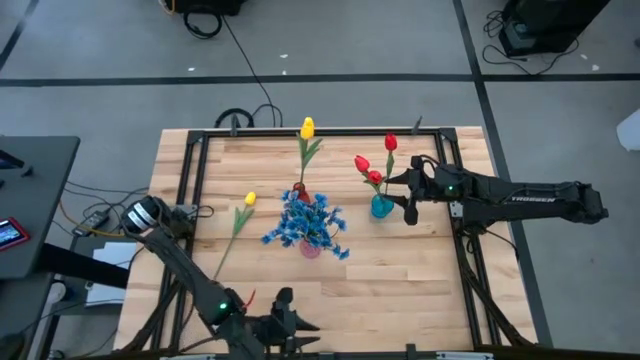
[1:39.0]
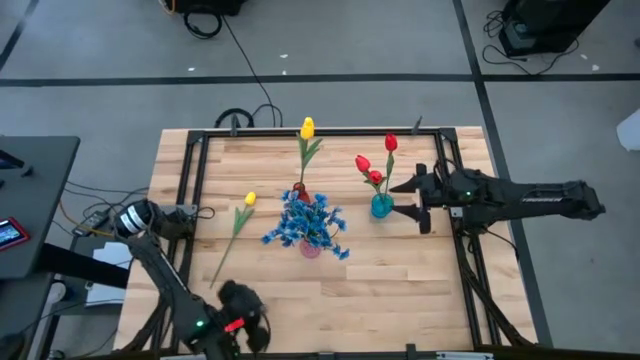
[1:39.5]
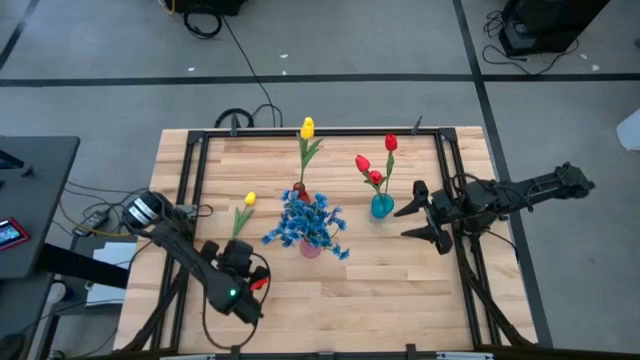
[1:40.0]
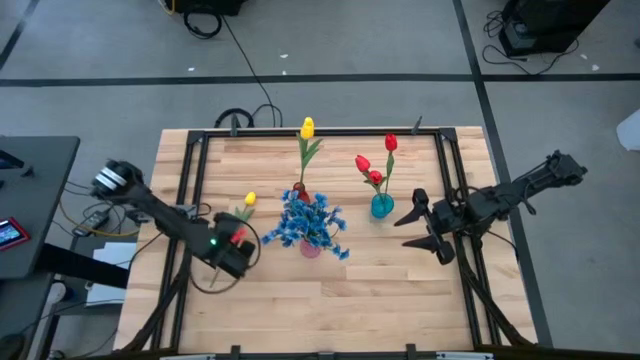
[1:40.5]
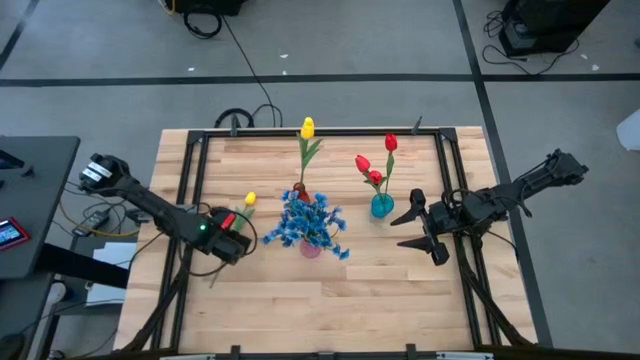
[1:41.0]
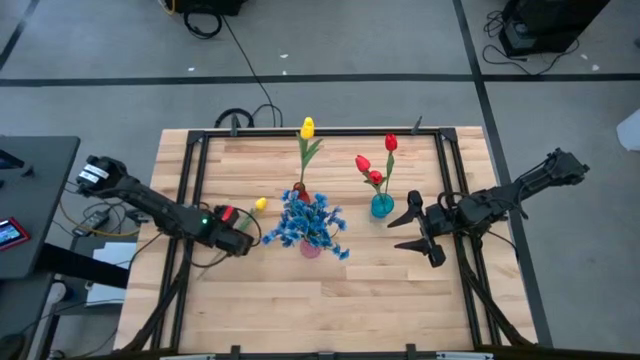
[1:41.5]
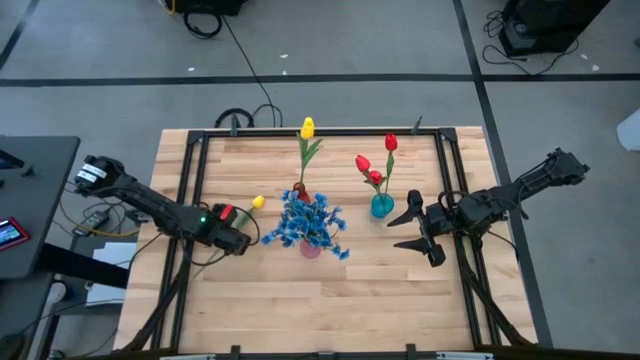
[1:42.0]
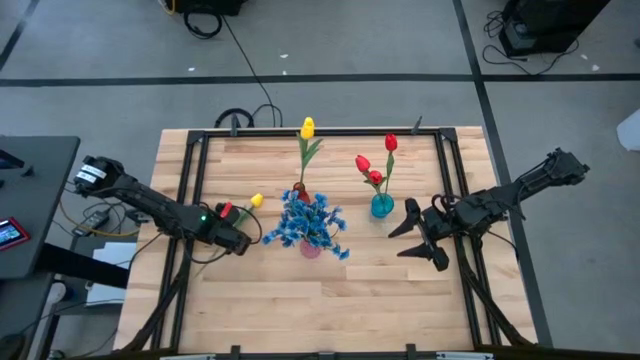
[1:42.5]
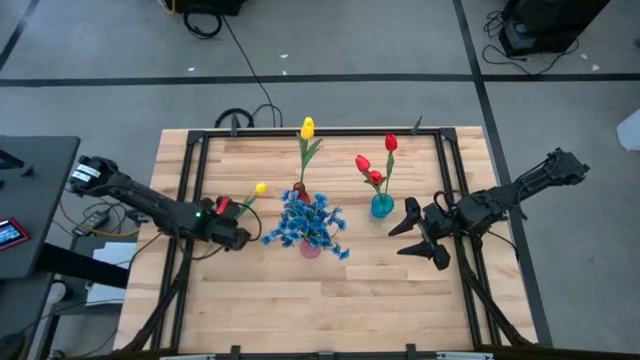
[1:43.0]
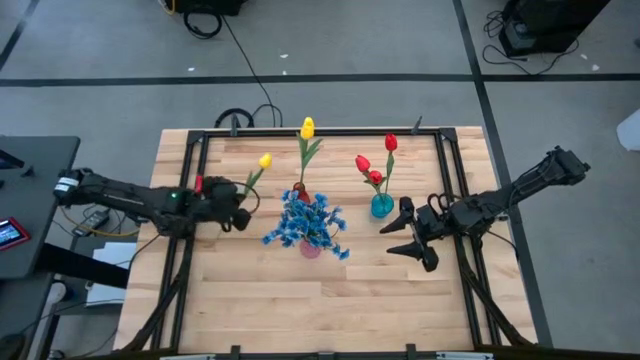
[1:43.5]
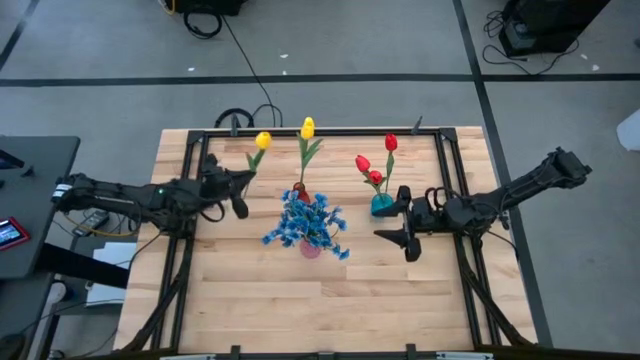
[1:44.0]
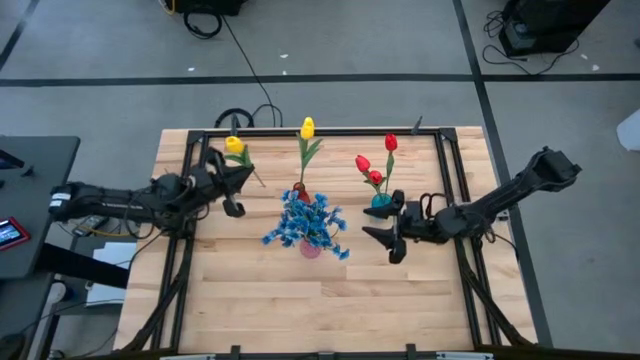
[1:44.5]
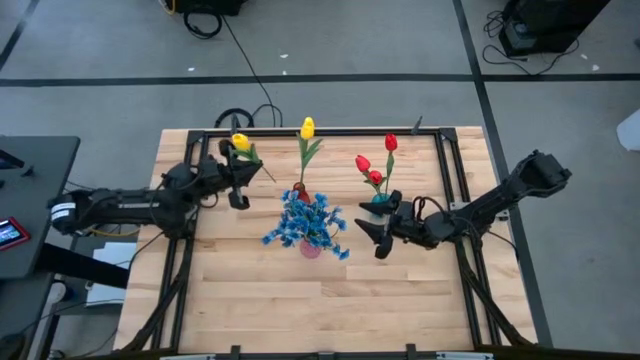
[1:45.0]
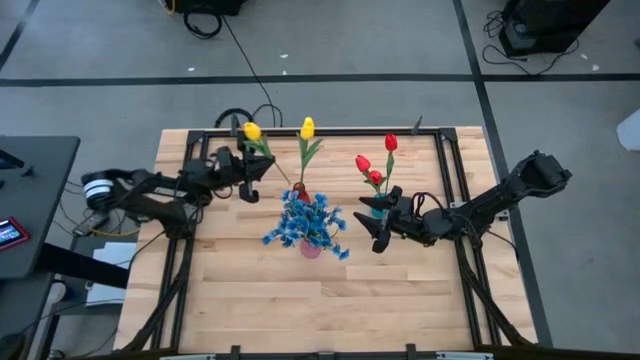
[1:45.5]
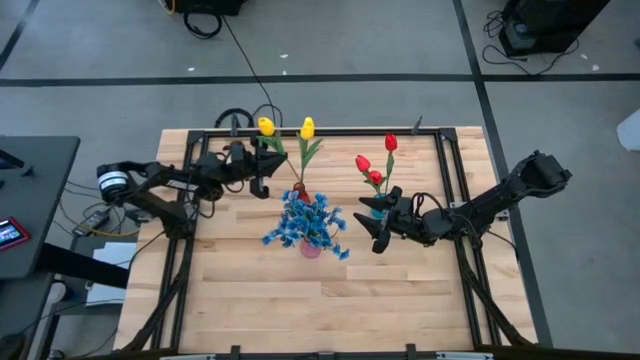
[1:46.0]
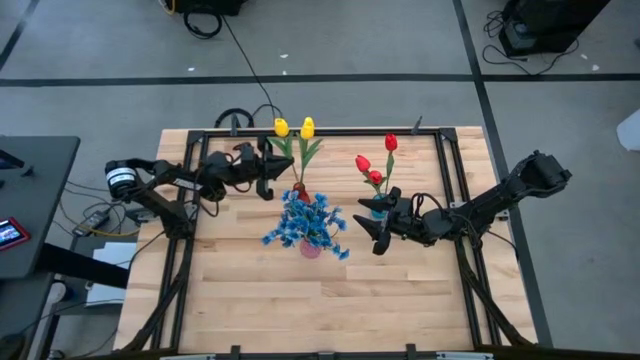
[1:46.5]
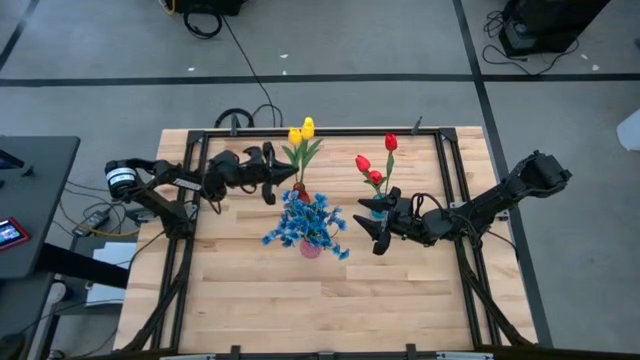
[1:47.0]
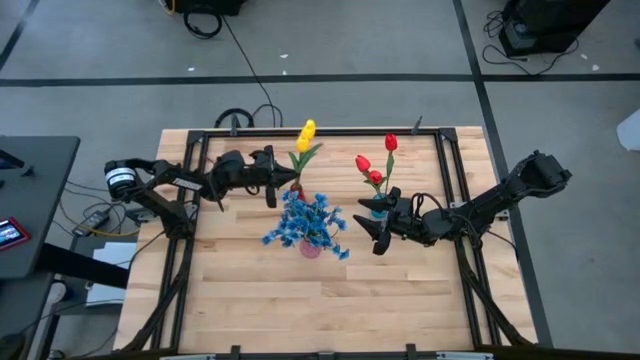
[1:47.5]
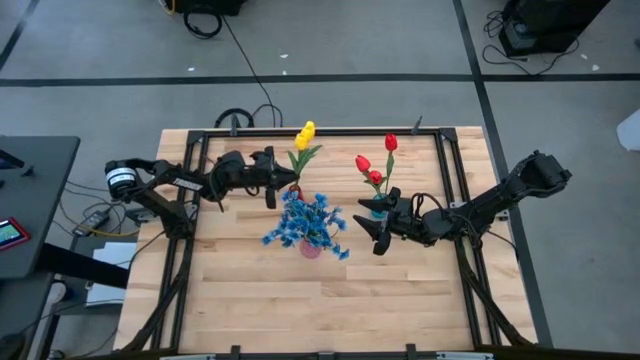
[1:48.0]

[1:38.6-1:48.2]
Task: Sort flowers into vase by color
Put the yellow flower into the red transparent vase

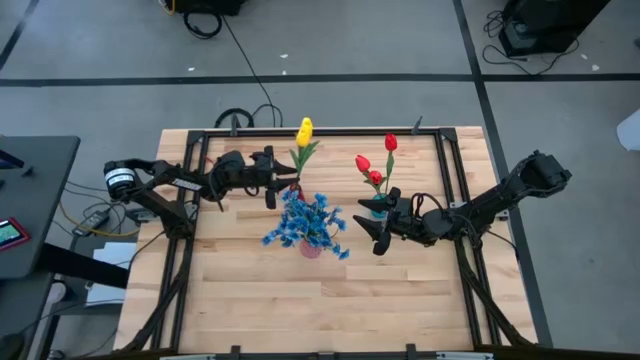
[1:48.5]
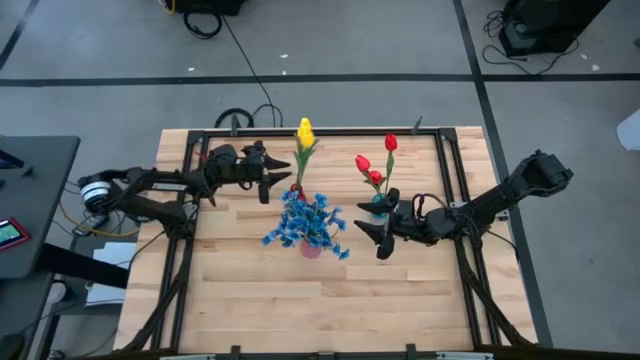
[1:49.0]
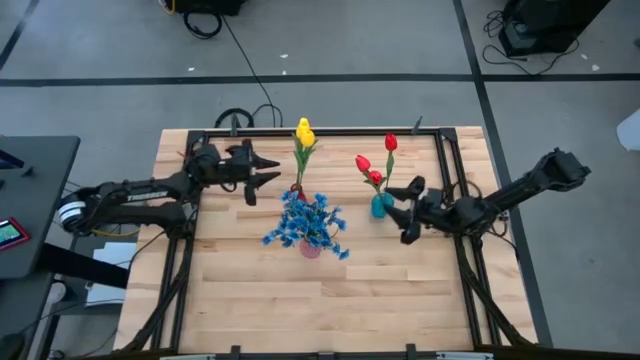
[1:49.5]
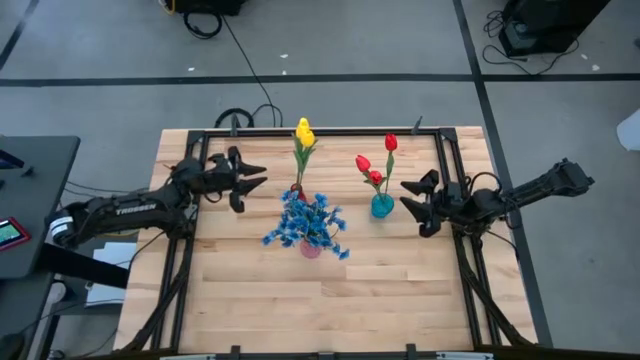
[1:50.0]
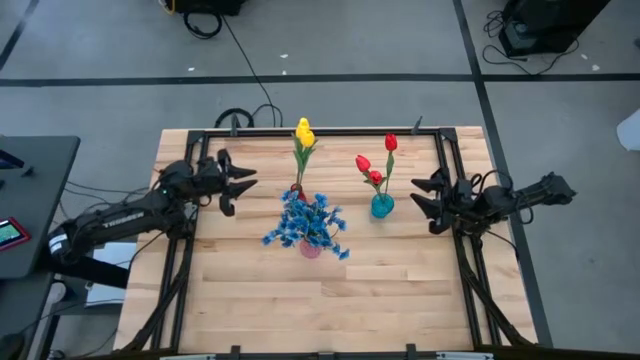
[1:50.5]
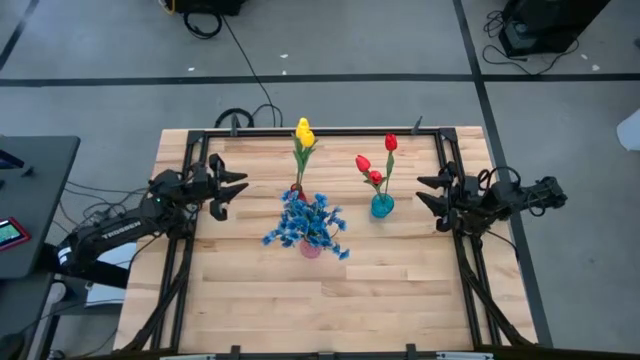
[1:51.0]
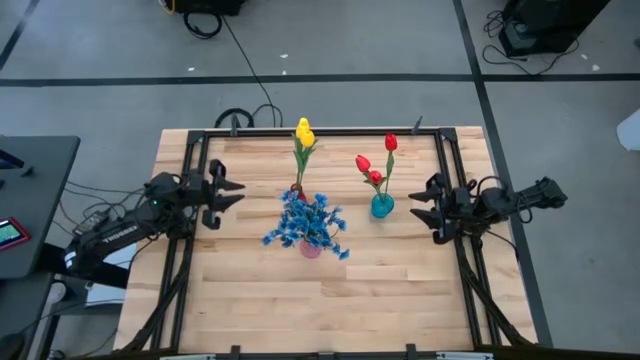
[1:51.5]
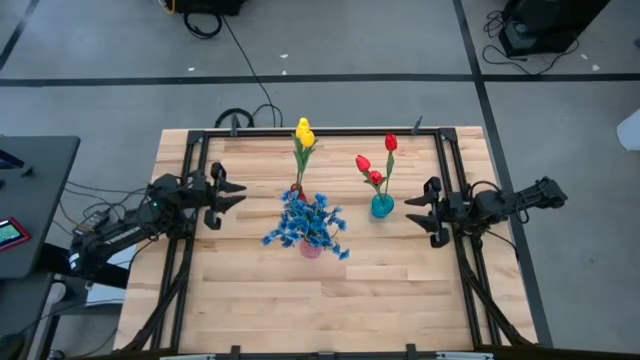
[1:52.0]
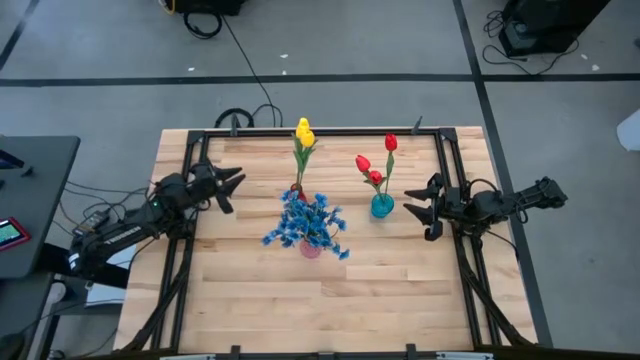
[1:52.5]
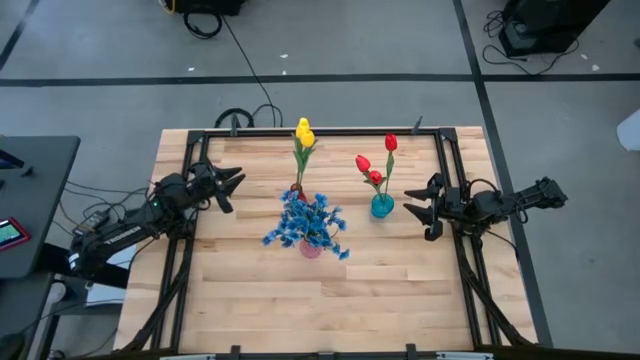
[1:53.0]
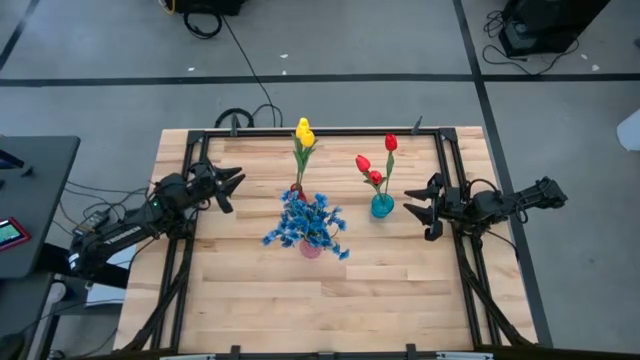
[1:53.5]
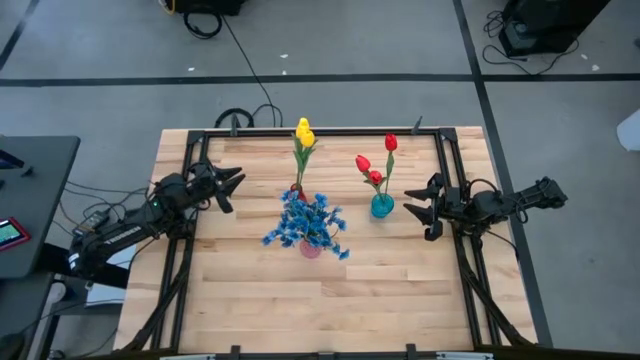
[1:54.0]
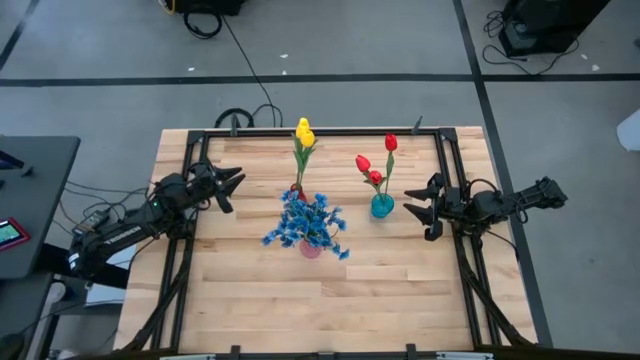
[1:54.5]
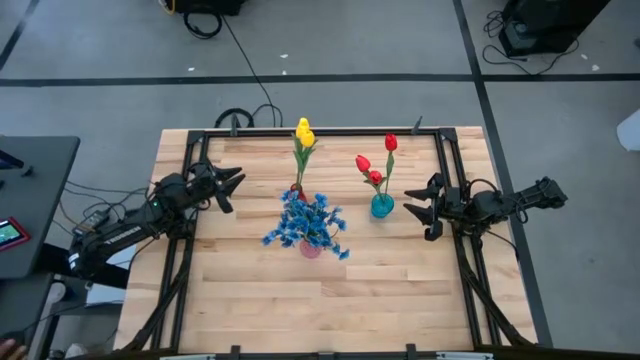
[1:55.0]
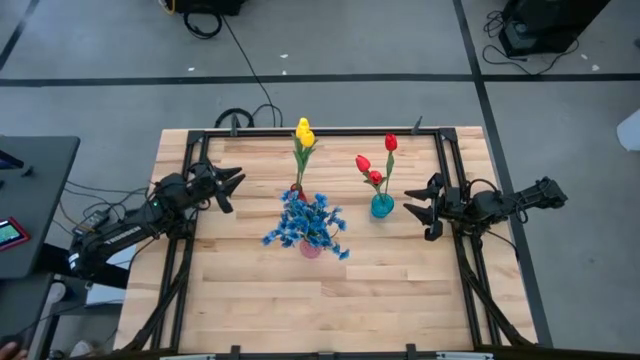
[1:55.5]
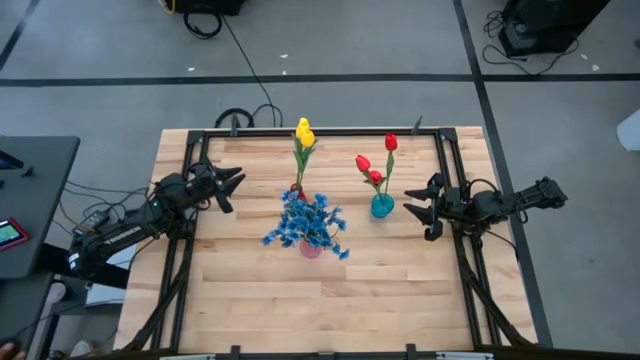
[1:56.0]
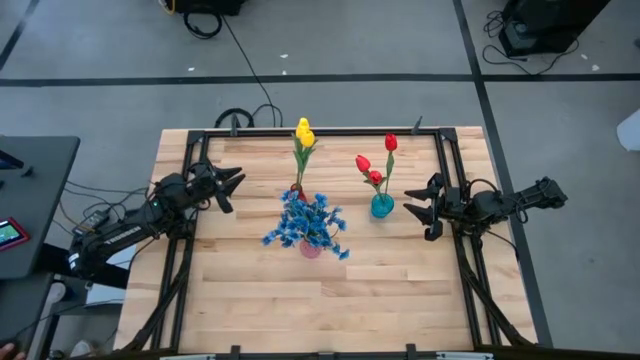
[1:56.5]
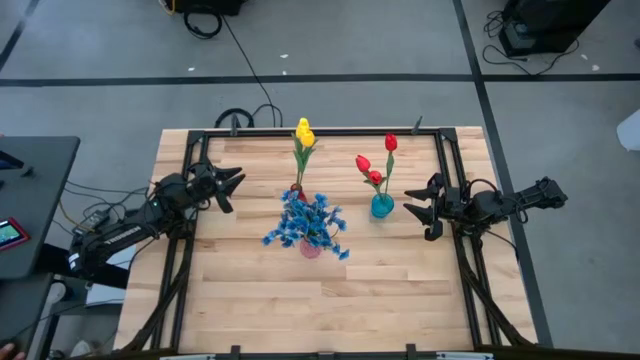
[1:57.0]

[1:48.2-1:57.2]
Return to Home Position
